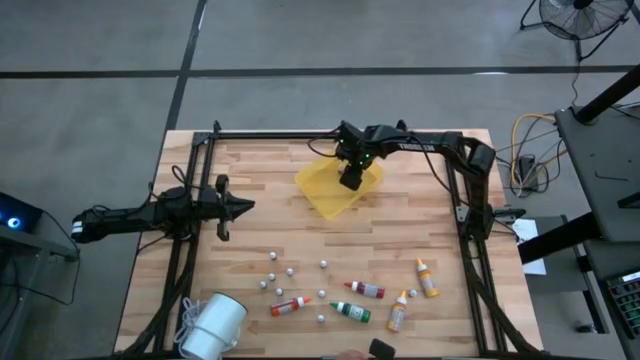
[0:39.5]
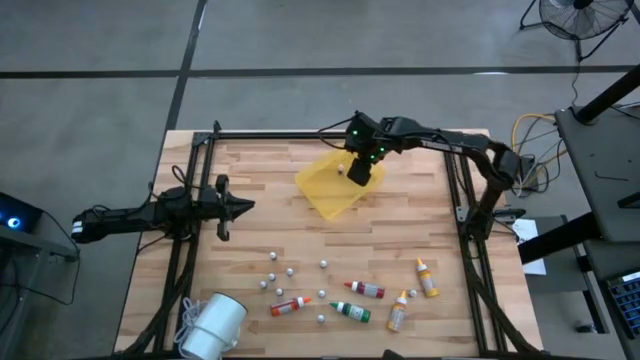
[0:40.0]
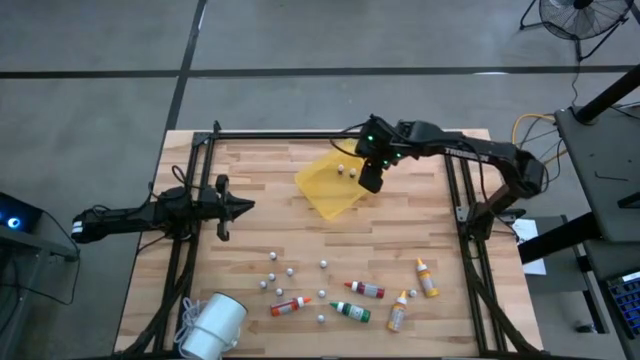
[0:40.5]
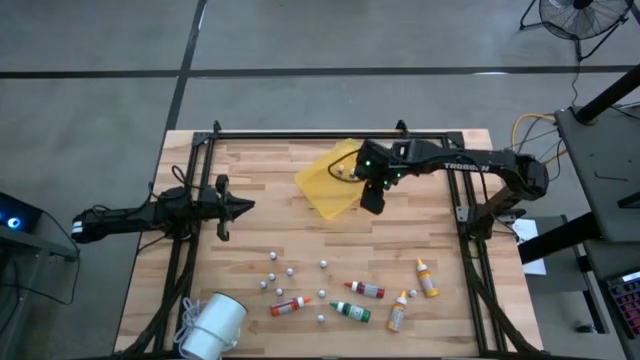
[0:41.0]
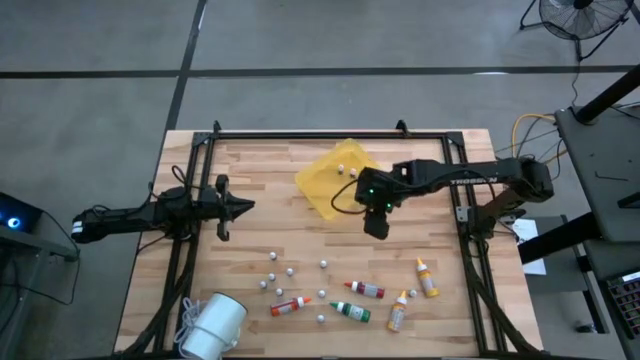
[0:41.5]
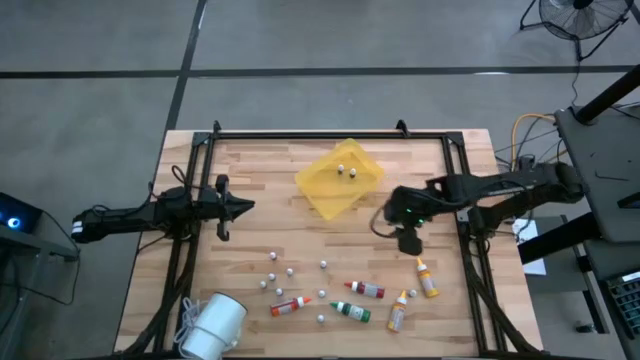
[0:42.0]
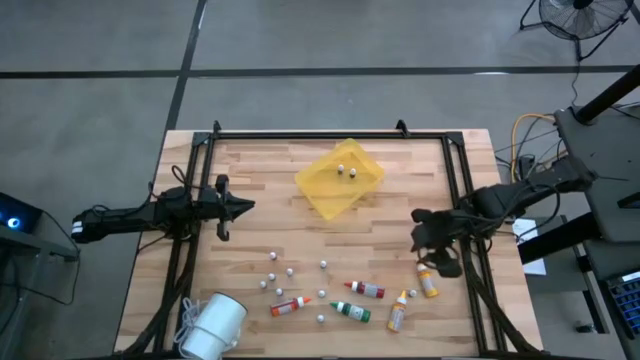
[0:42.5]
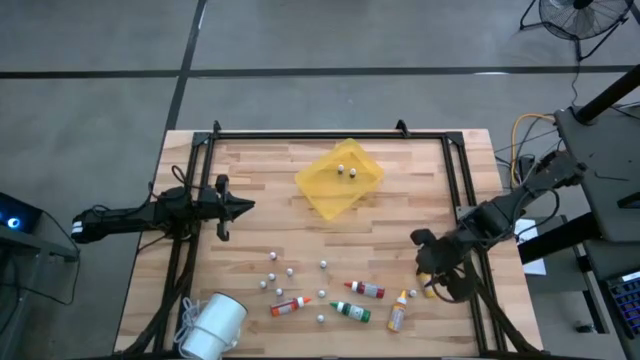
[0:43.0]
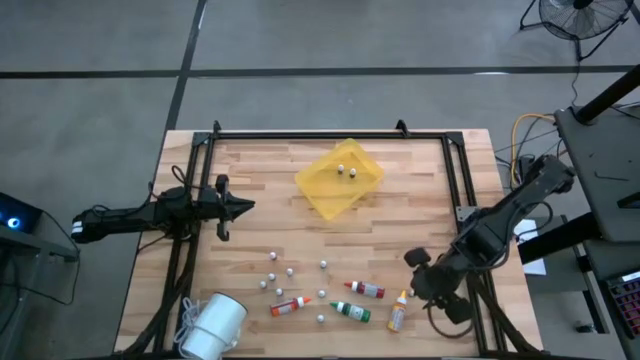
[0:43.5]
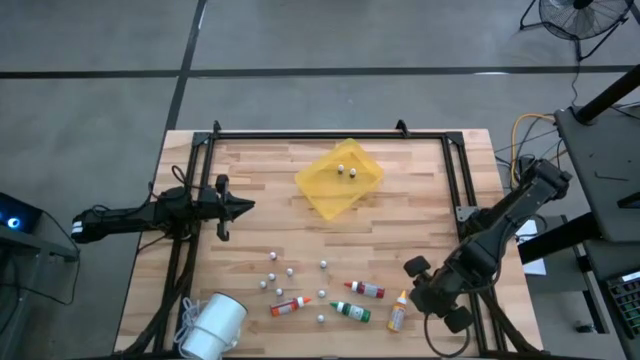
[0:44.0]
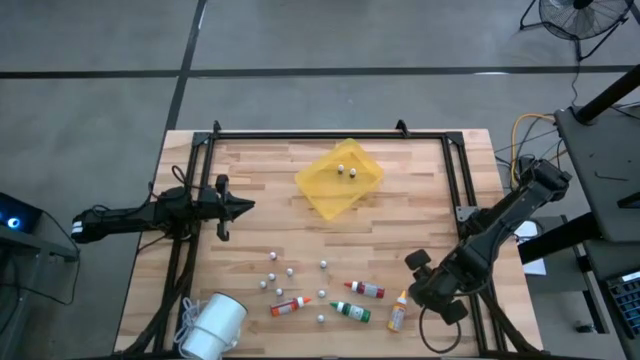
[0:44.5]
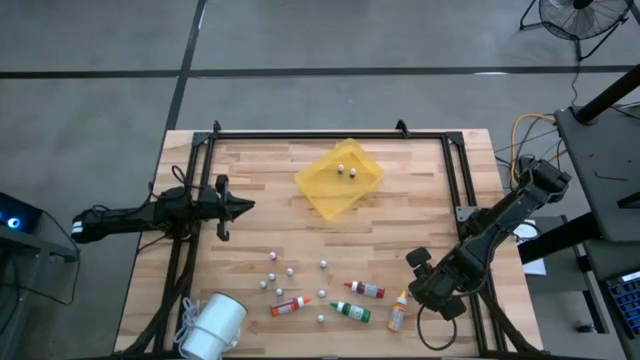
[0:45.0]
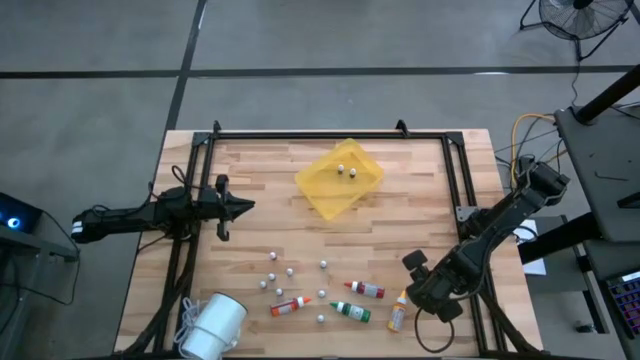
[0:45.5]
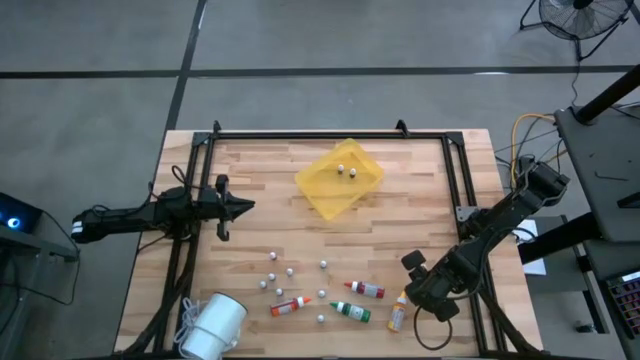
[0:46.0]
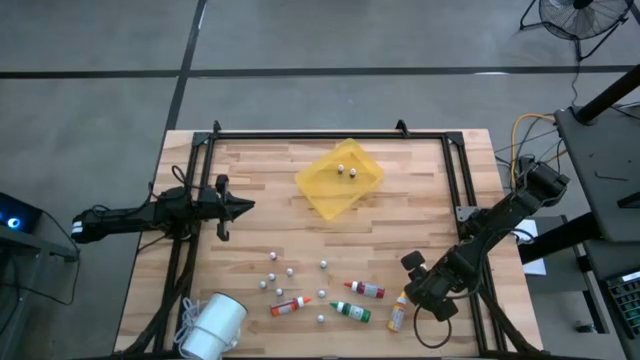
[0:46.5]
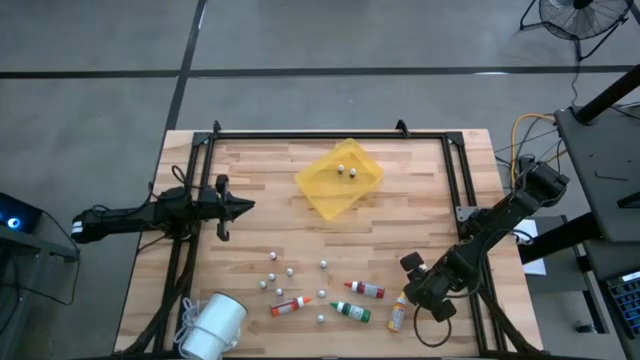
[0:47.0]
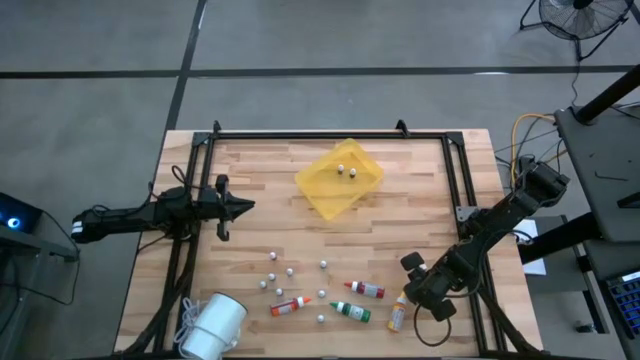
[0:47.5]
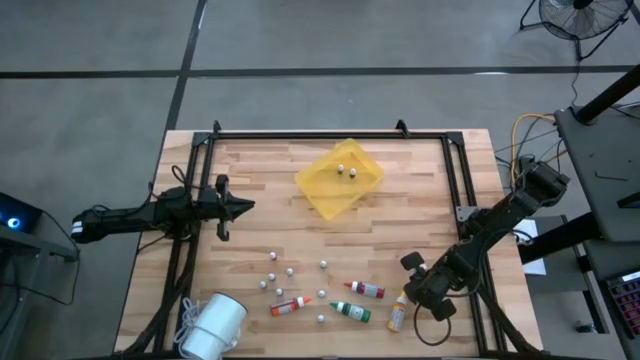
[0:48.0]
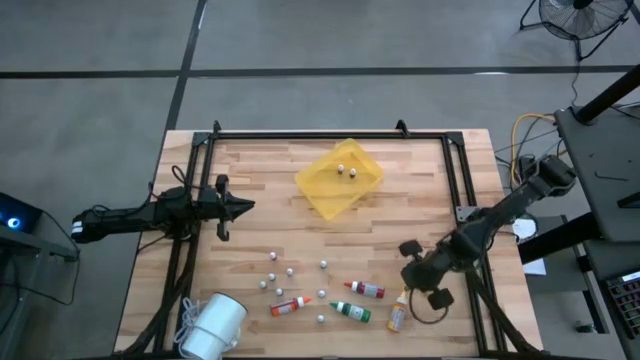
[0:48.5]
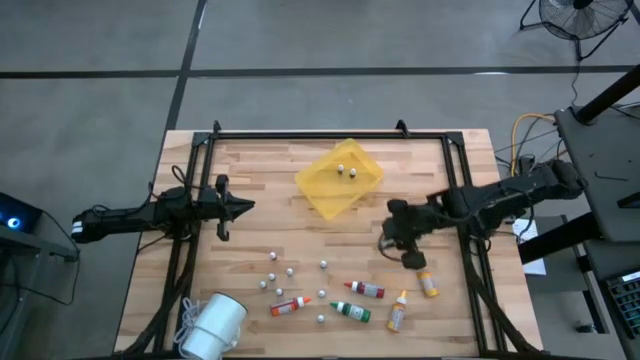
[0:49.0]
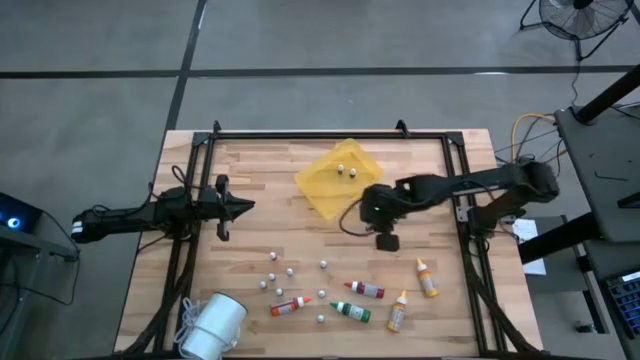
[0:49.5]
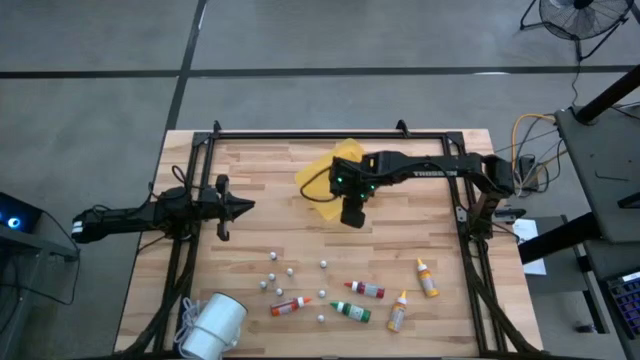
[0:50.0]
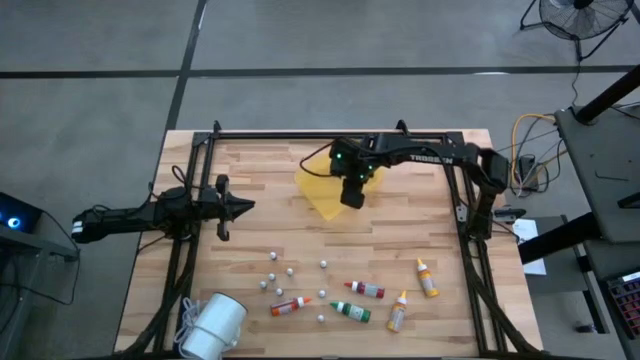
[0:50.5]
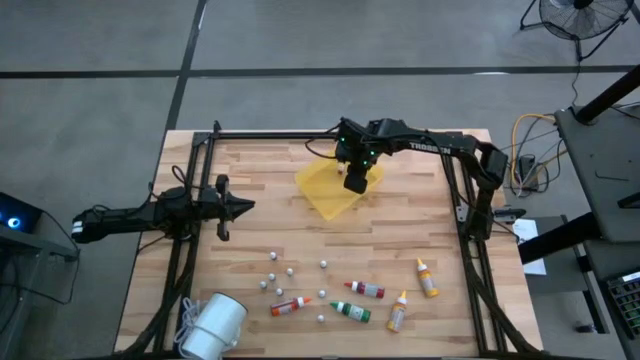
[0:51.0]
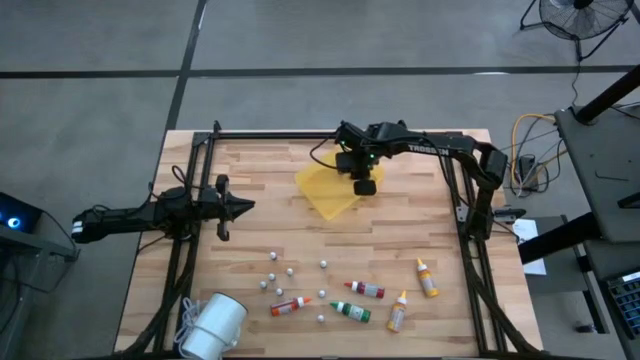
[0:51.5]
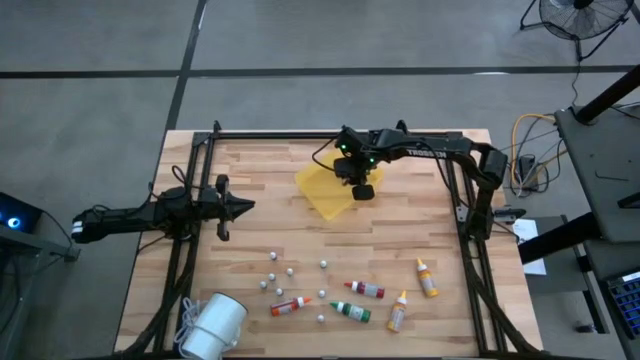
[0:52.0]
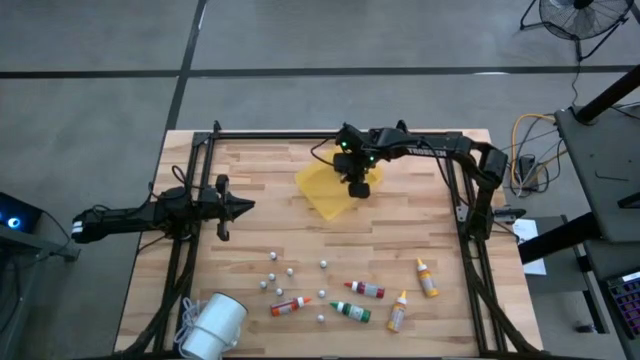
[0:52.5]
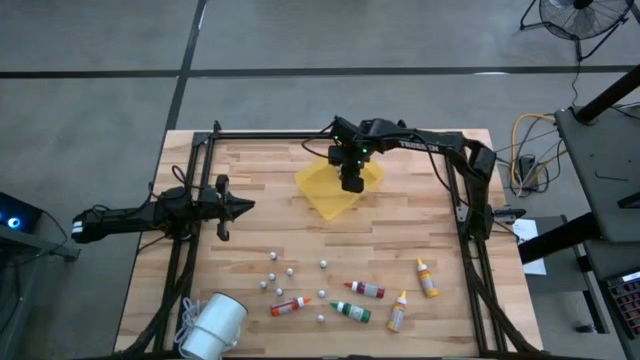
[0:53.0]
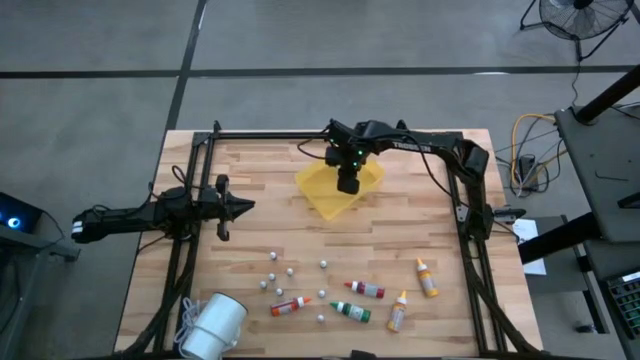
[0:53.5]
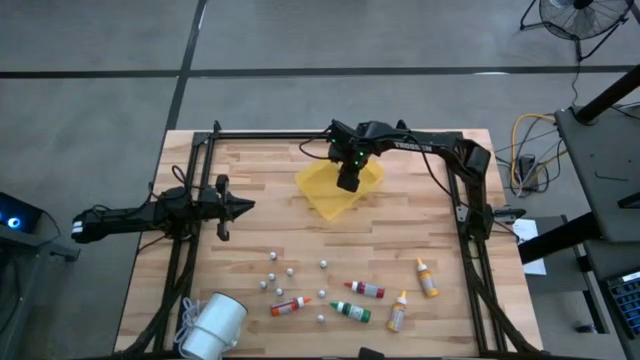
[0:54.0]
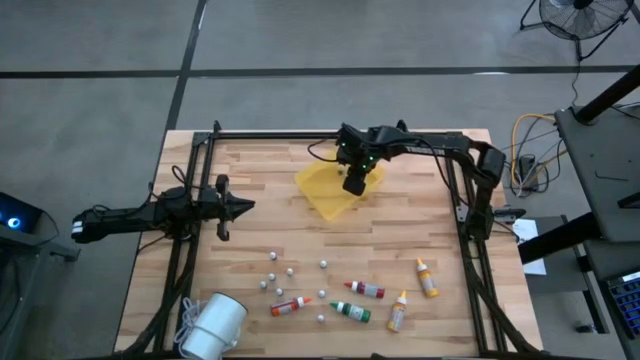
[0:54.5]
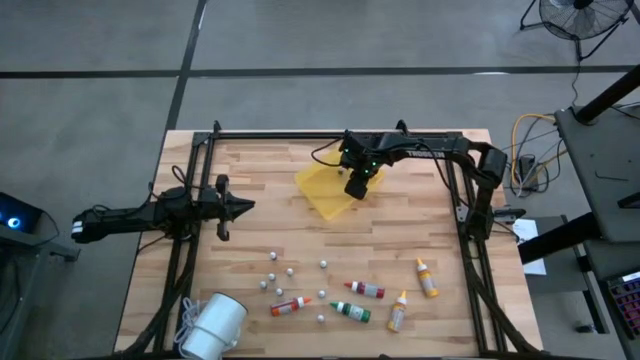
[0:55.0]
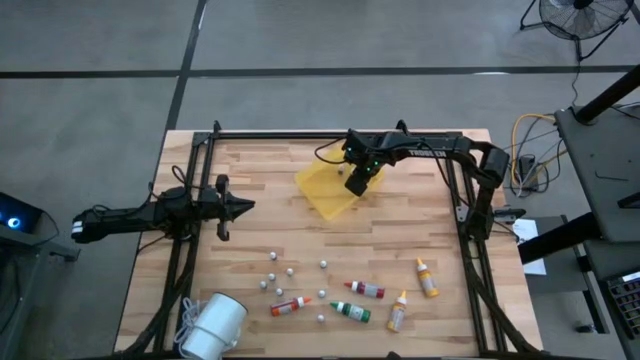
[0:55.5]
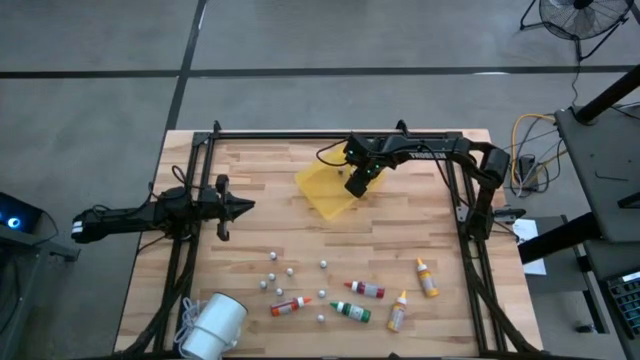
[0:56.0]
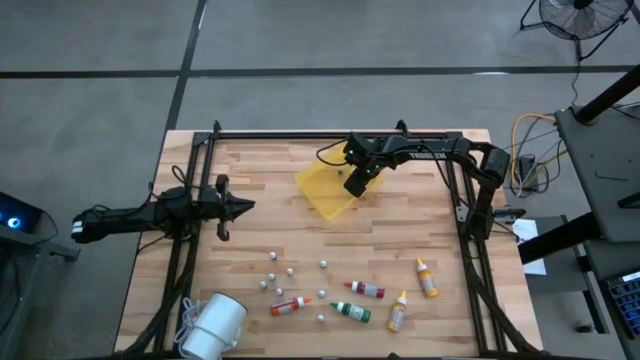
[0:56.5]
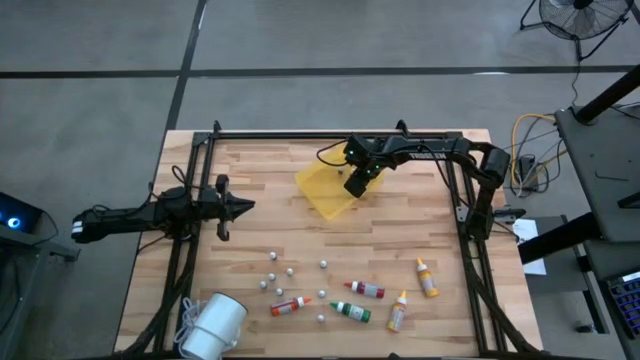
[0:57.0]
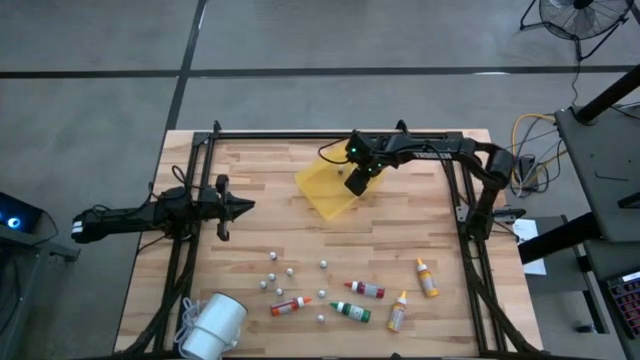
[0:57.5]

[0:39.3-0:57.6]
Task: Pick & Place food coloring
Put the small black food coloring bottle into the yellow bin
